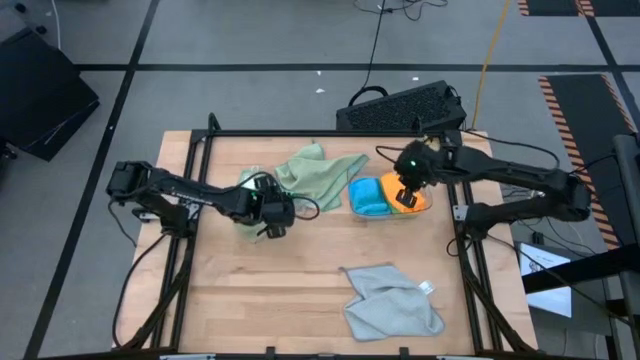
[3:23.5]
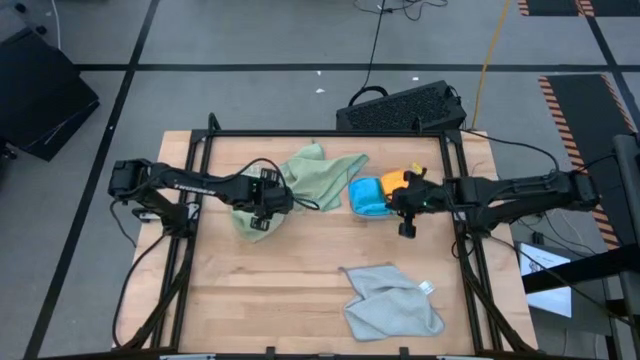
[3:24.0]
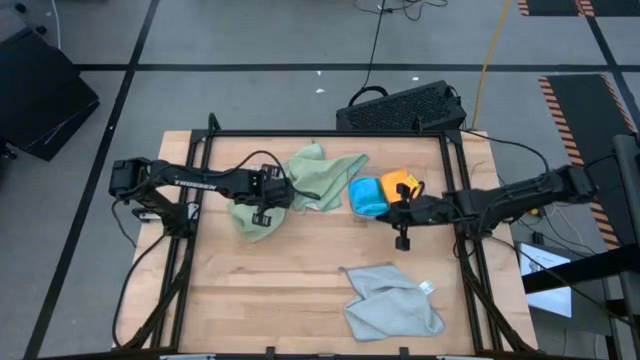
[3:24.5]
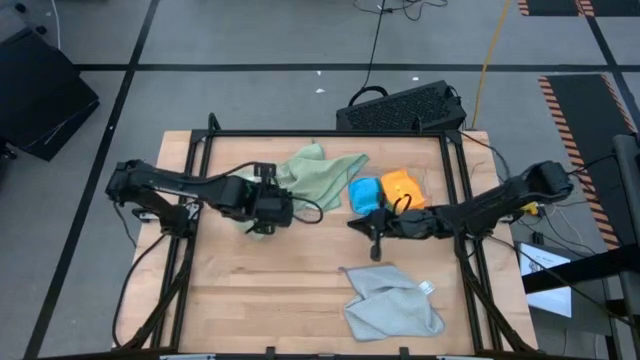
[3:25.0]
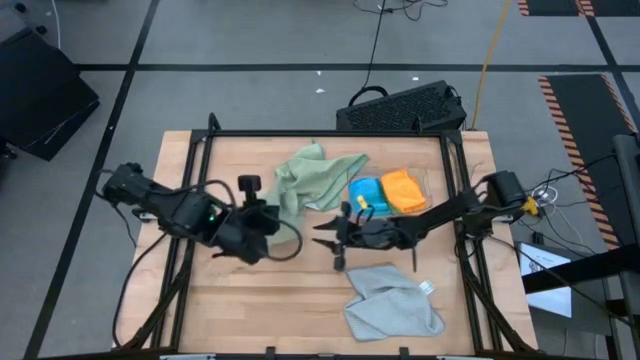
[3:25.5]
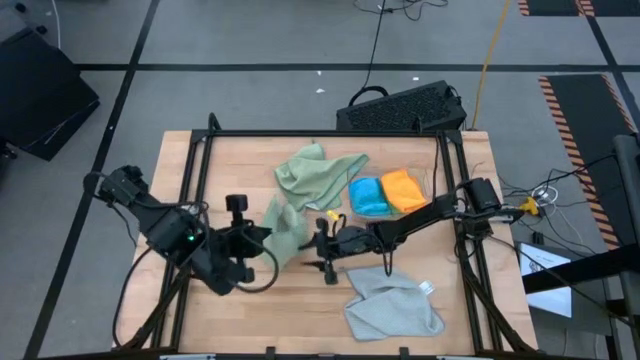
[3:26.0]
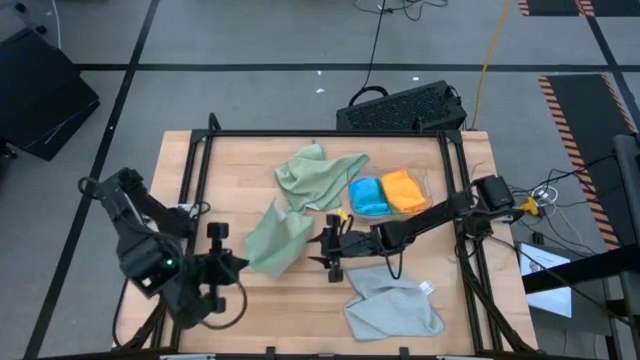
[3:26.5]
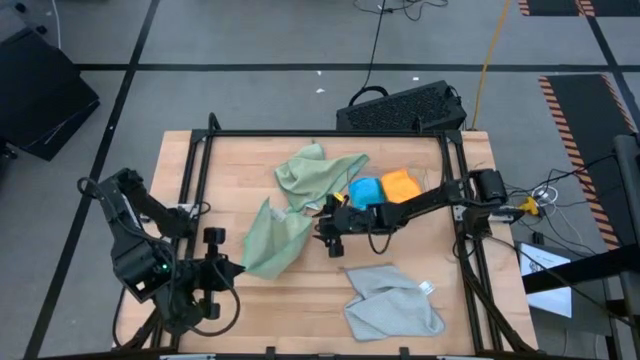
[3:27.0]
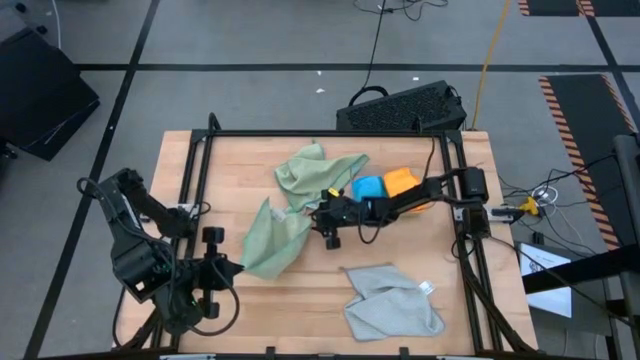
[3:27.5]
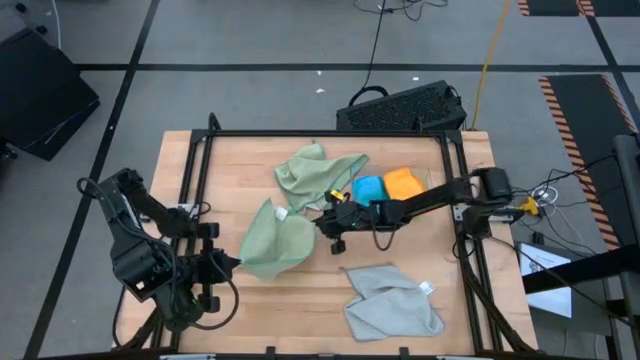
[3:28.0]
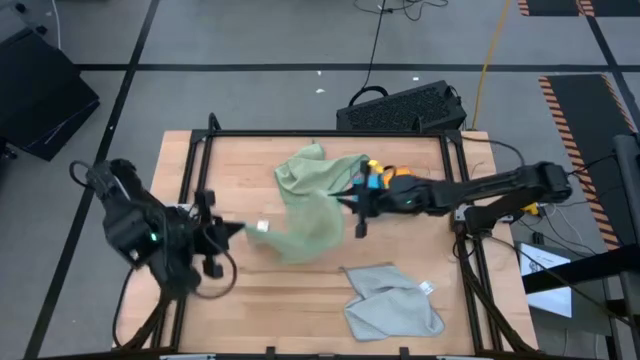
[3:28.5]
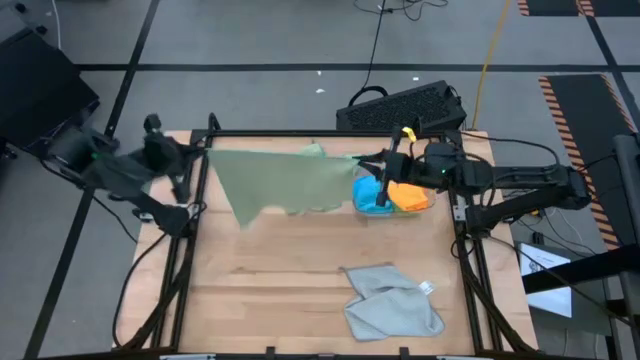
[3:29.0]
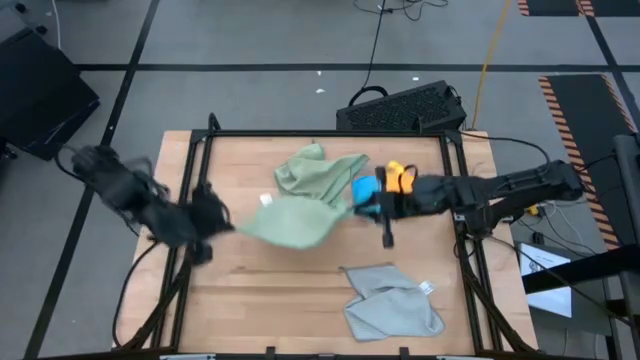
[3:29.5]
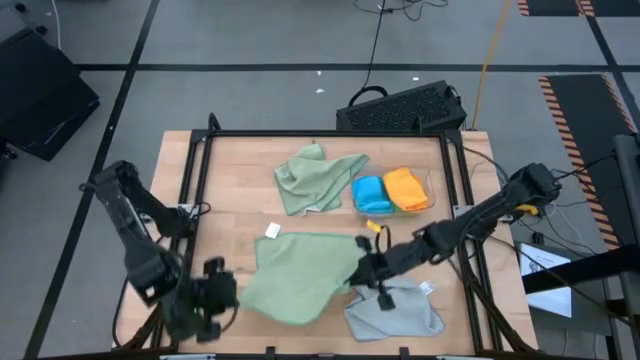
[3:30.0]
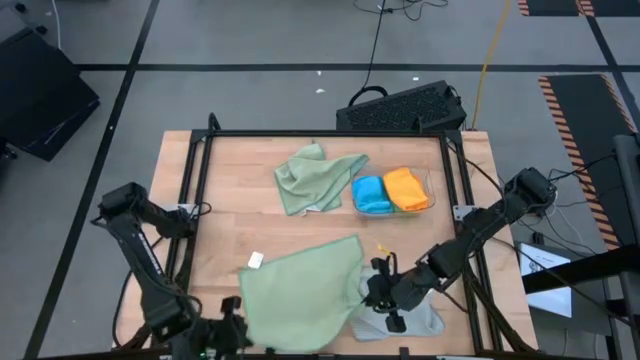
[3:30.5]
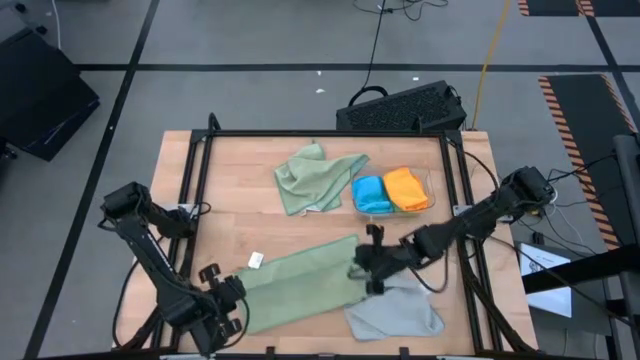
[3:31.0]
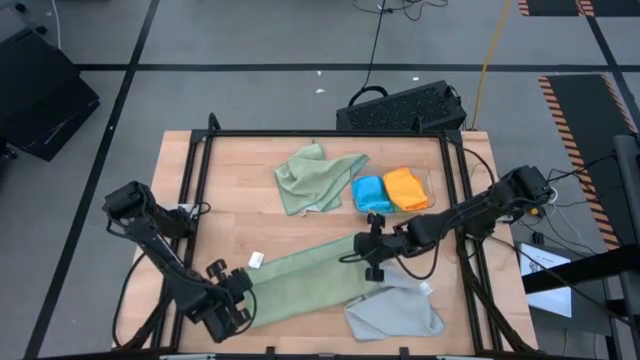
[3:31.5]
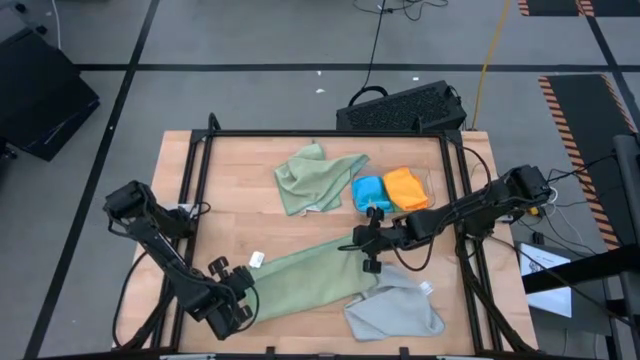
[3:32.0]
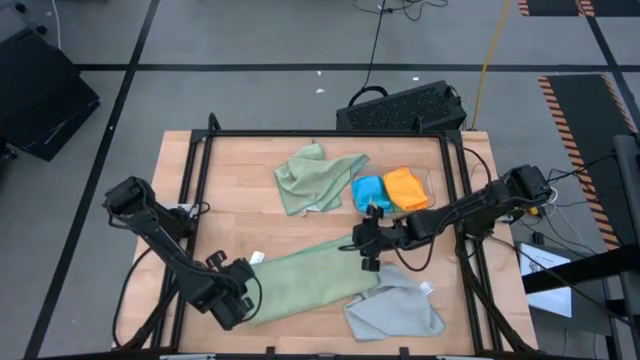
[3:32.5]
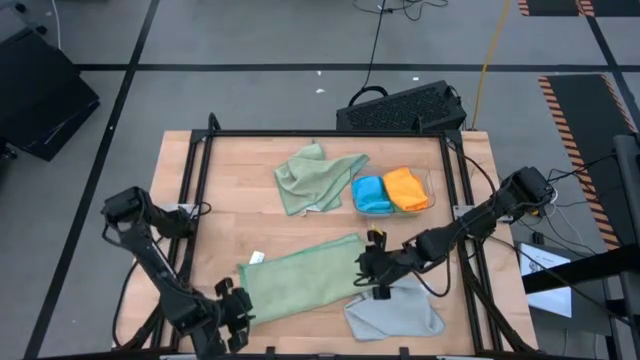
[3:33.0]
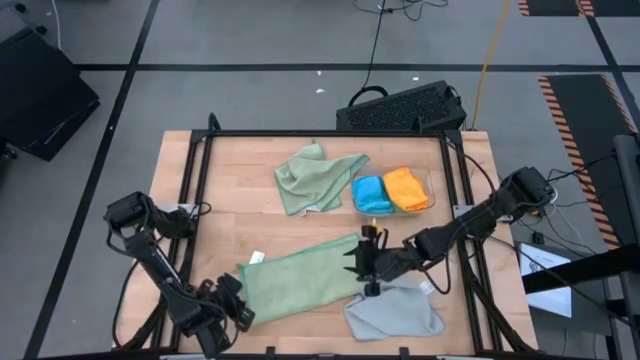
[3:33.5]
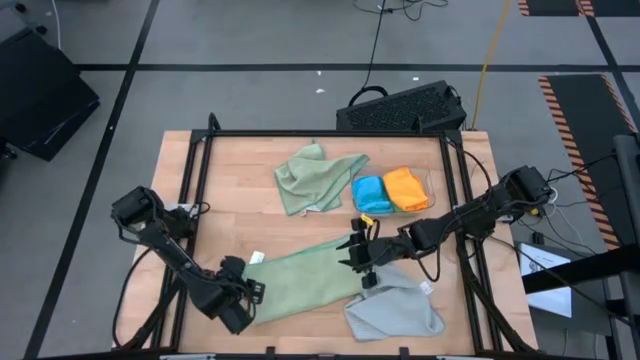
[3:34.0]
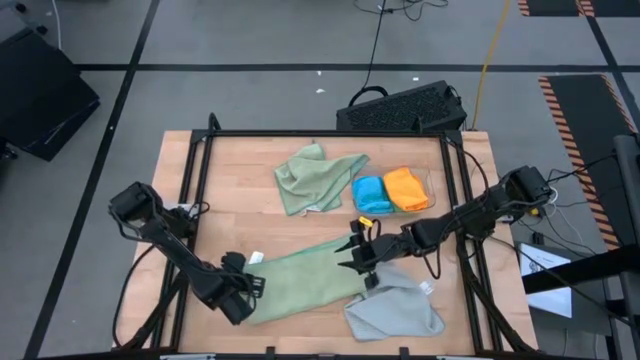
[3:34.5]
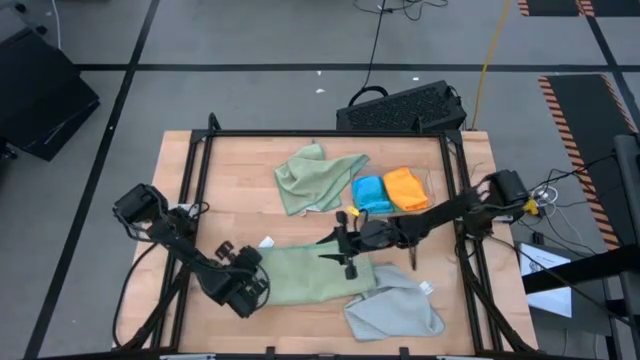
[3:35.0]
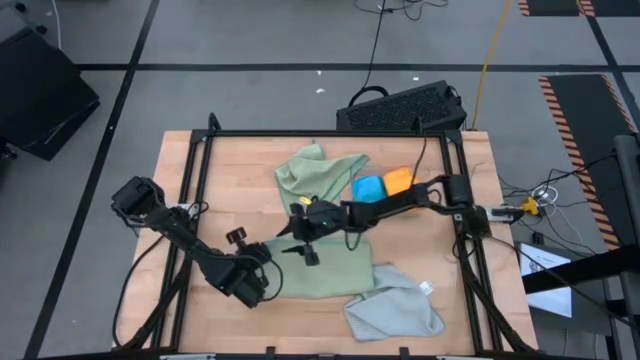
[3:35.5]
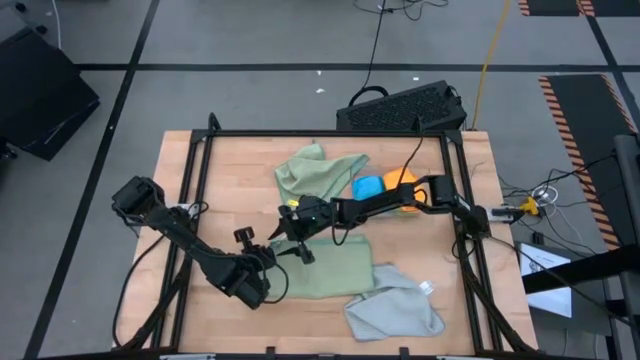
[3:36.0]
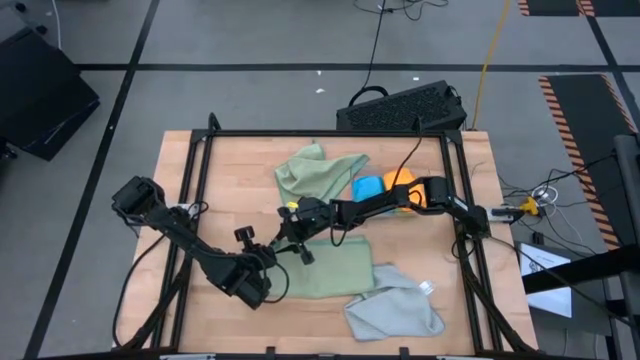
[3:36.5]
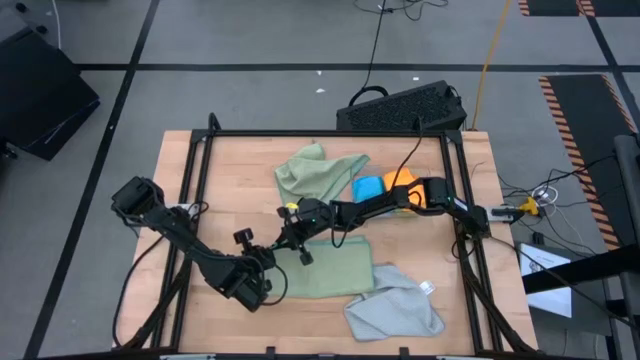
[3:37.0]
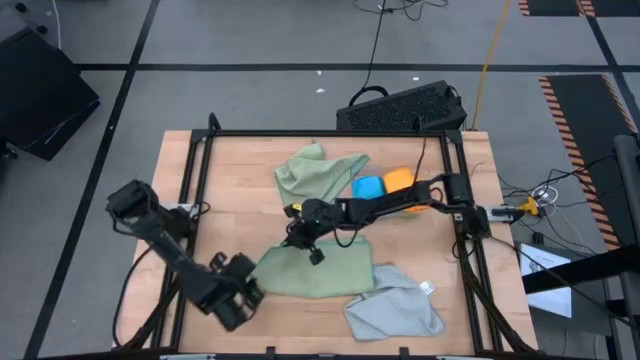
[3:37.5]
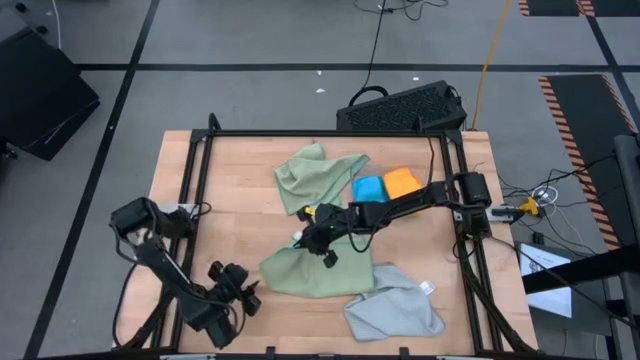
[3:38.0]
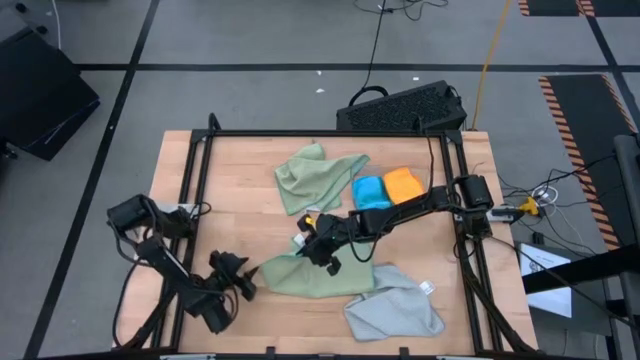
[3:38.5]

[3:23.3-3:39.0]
Task: Fold microfiber towels
Fold the left light green microfiber cloth

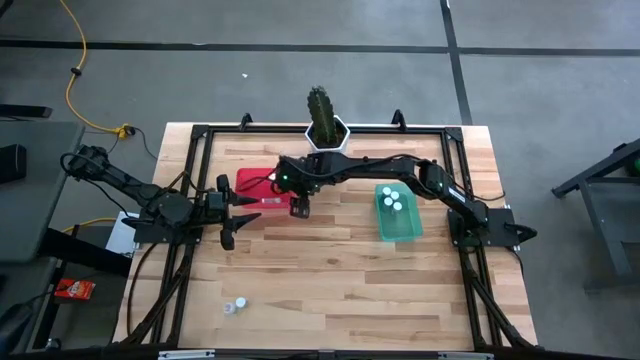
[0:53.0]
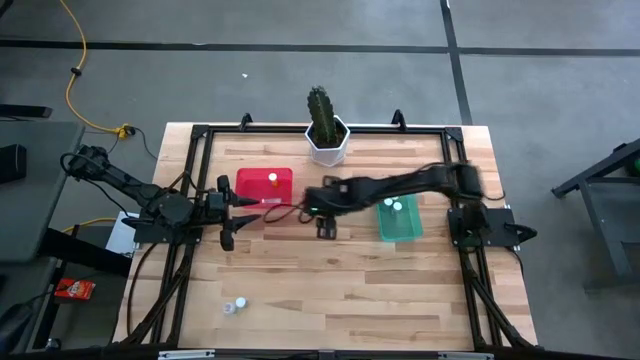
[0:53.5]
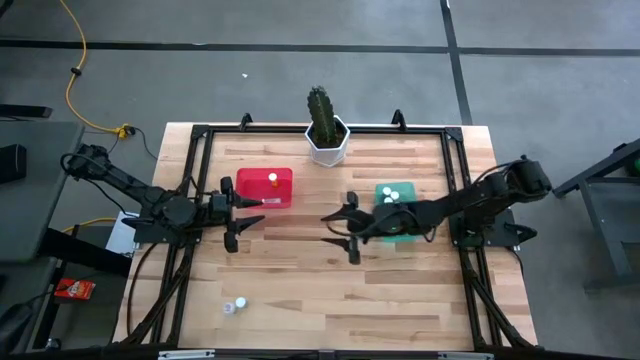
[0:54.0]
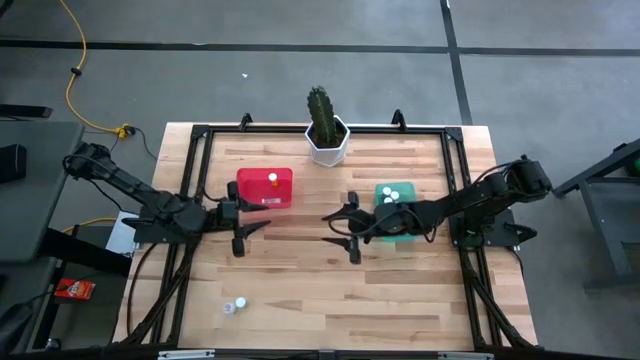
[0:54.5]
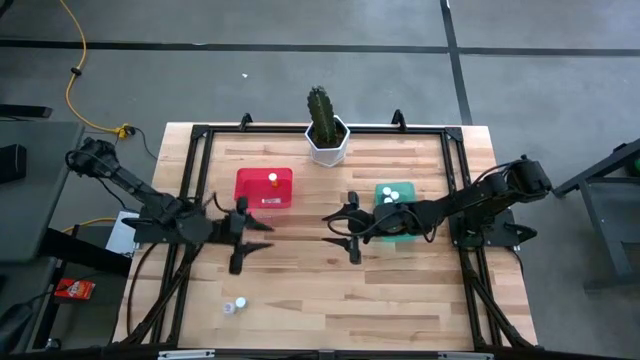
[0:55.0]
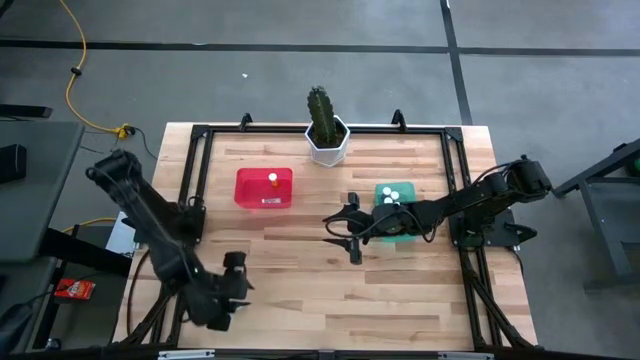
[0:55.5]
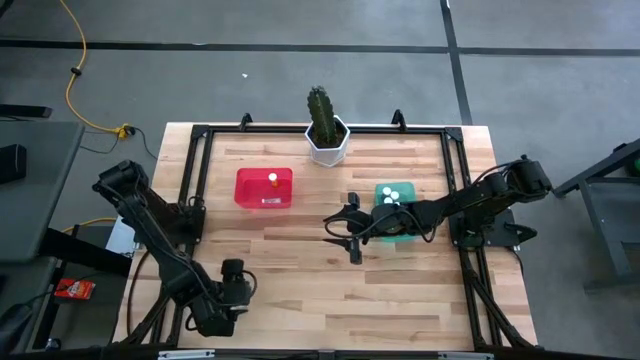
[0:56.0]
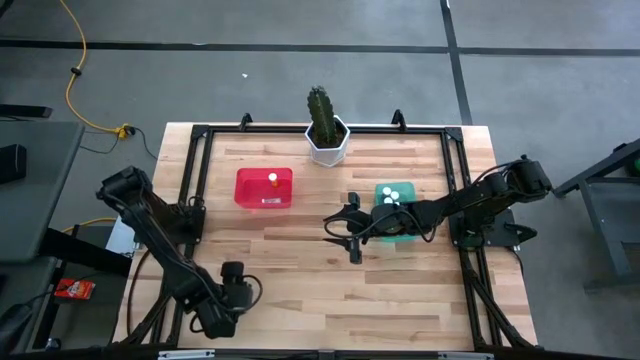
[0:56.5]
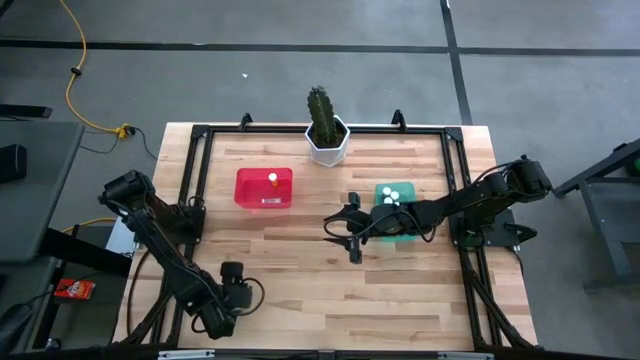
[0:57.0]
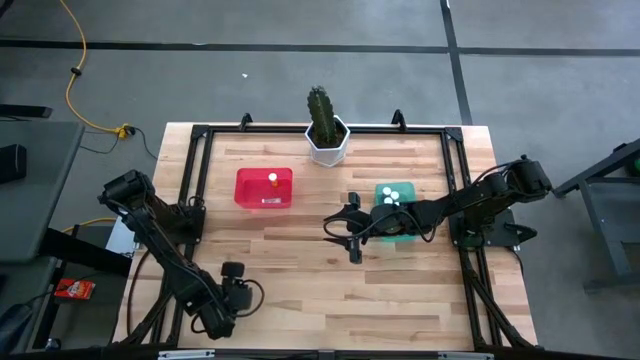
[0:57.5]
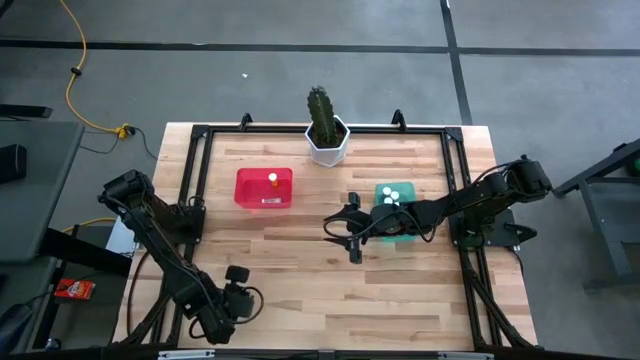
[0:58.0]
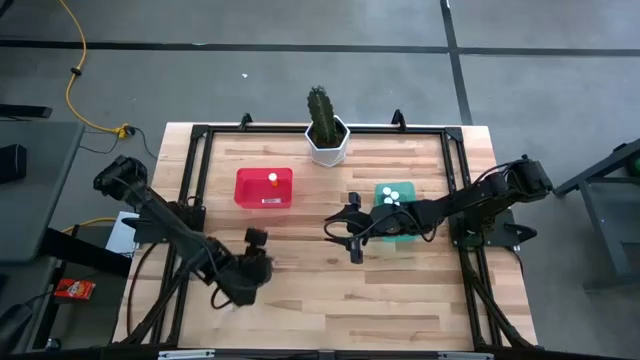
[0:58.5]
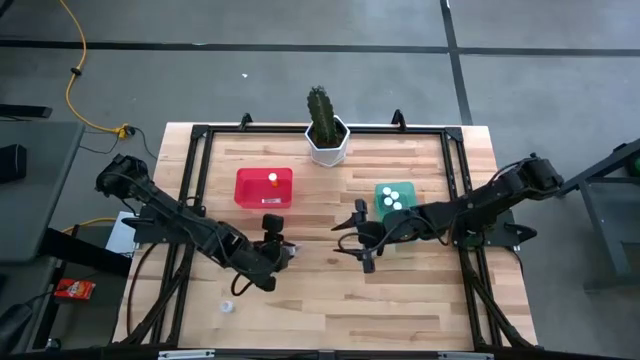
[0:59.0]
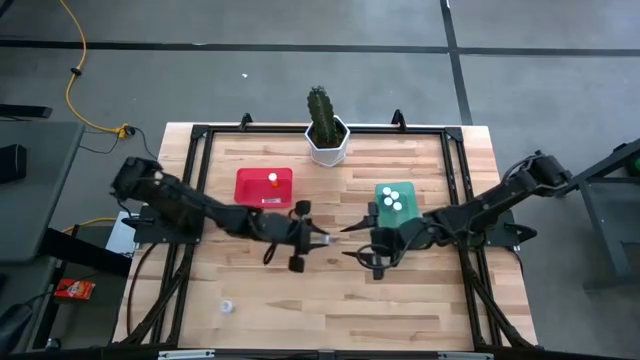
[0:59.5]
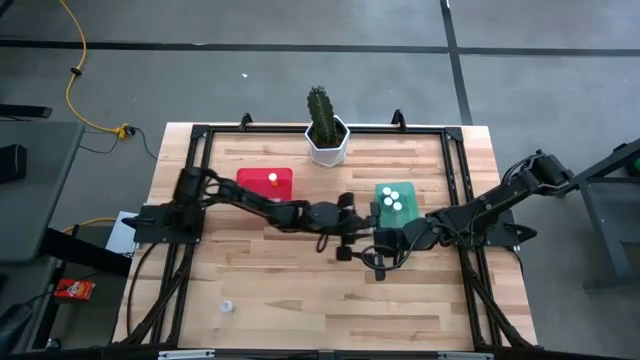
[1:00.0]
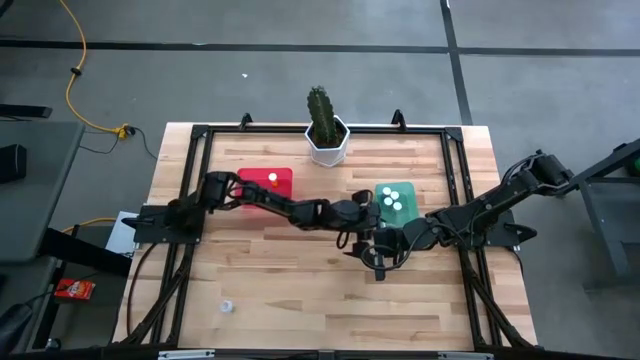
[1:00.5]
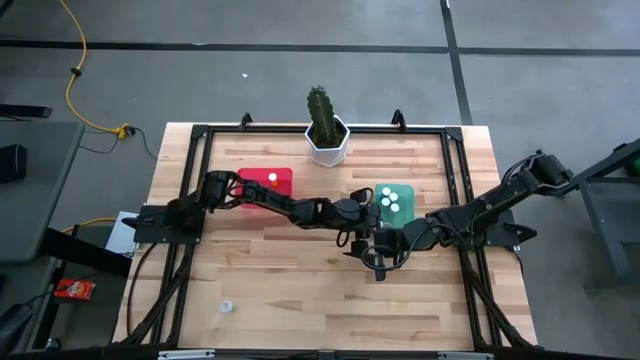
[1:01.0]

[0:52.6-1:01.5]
Task: Pick and place medicine bottles into bin by pill shape (circle, oval)
Put the green capsule bottle into the green bin
